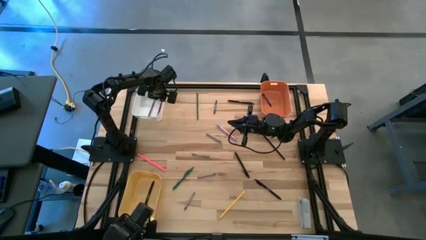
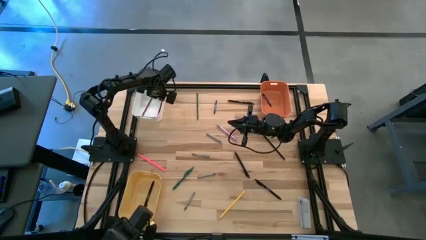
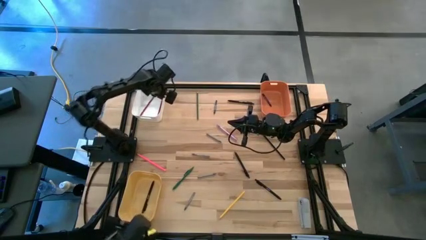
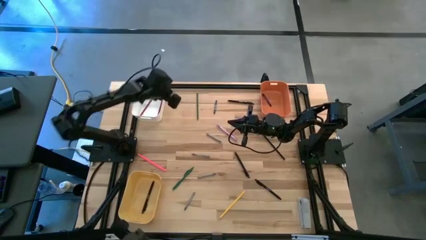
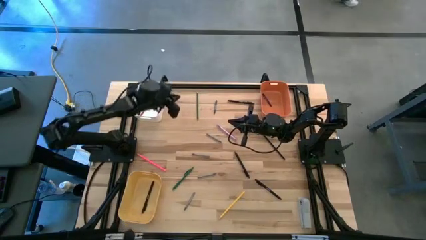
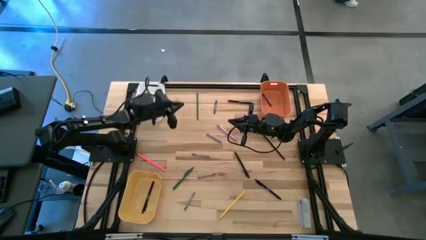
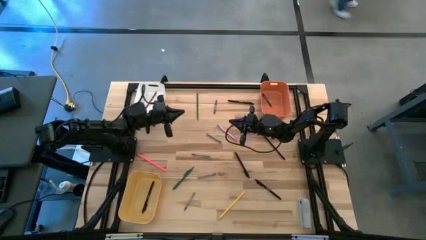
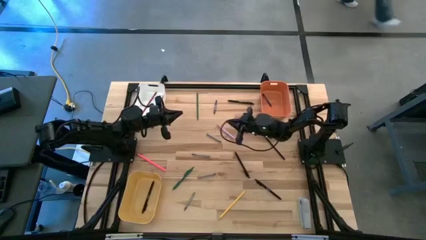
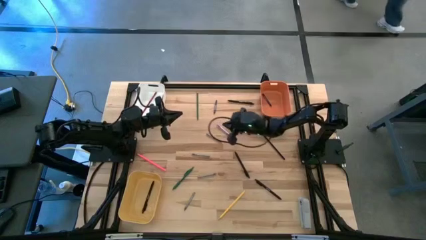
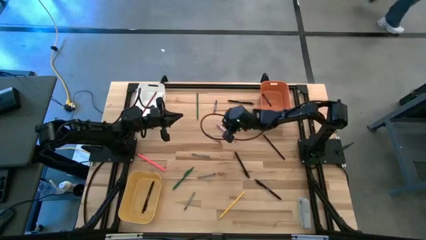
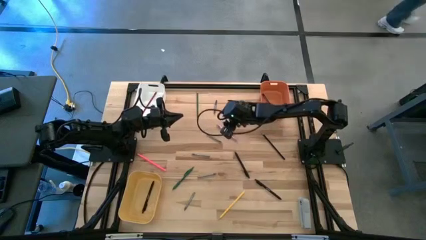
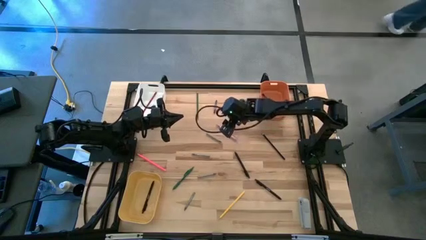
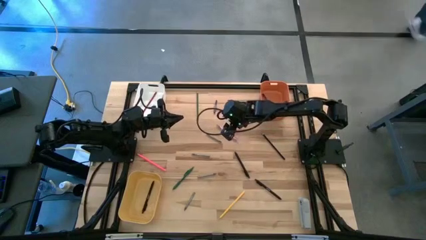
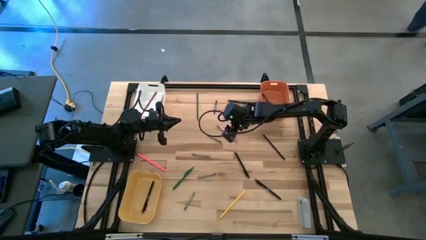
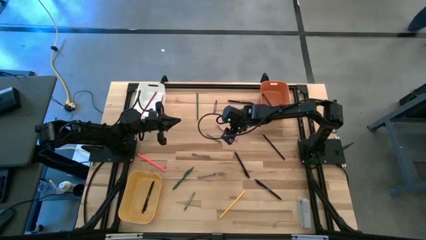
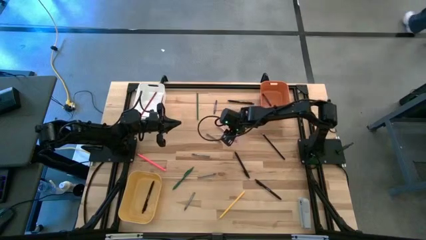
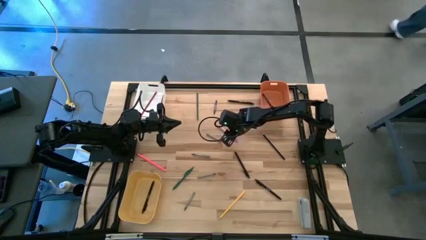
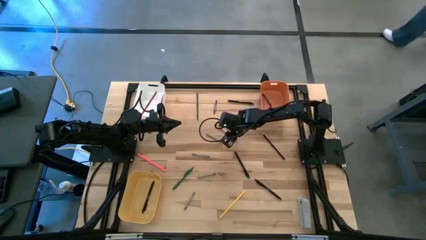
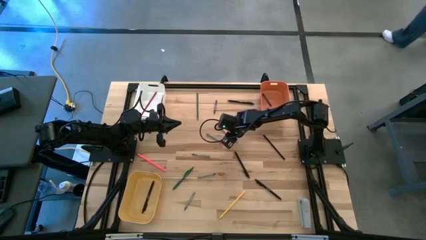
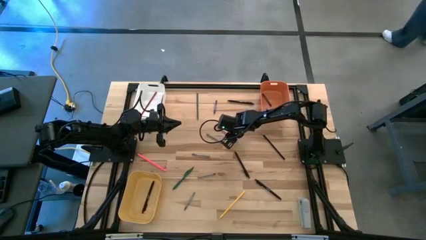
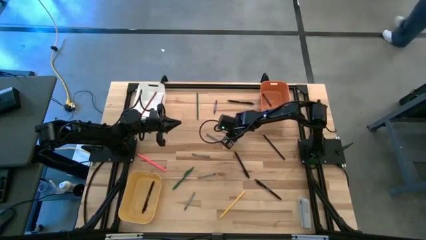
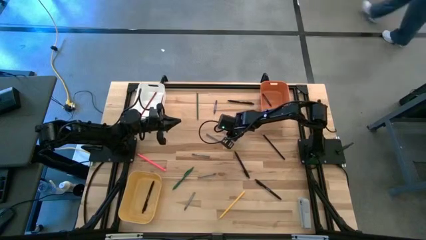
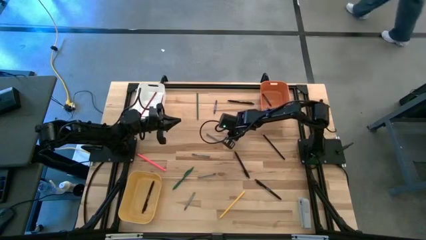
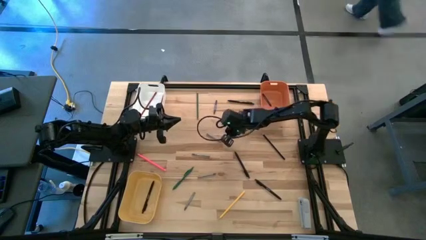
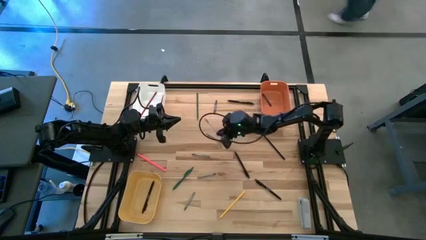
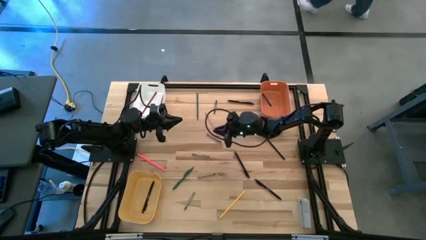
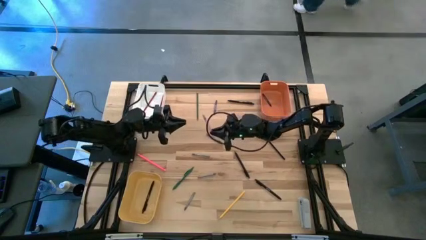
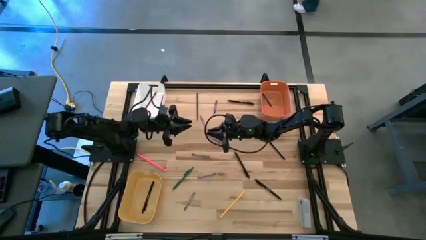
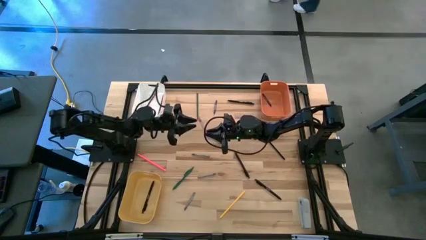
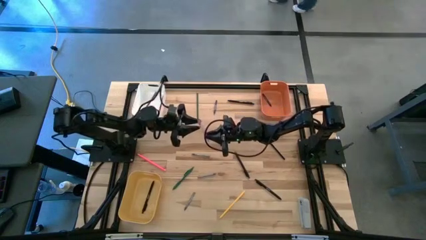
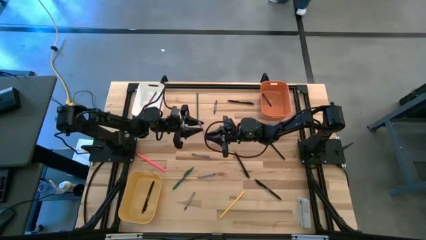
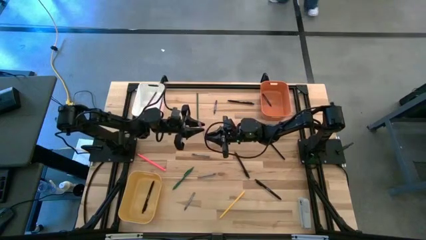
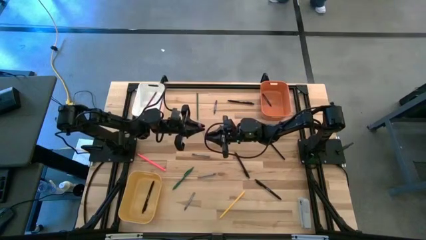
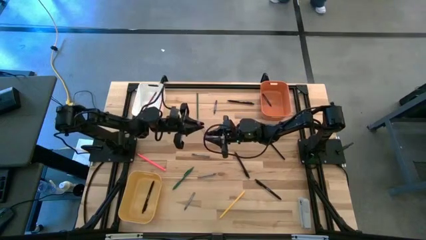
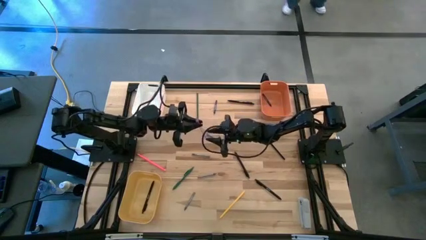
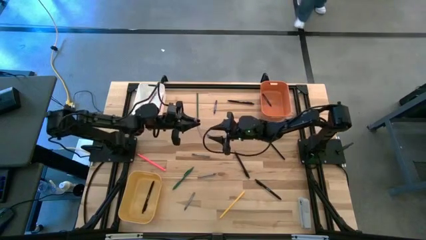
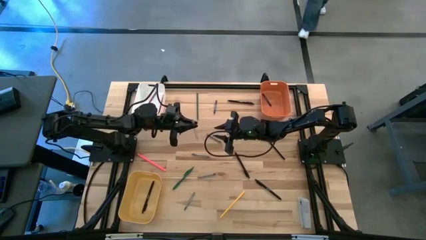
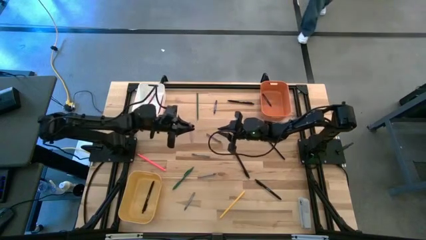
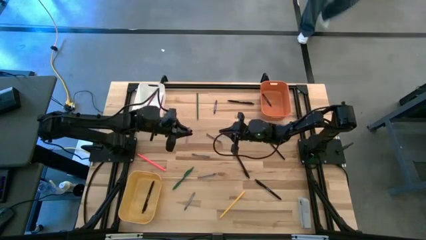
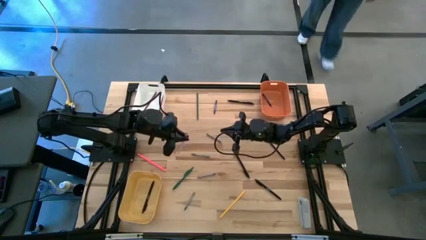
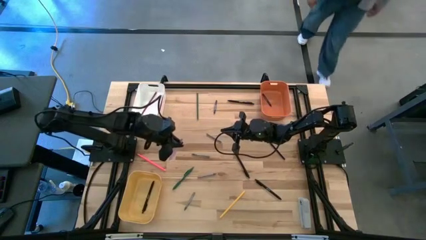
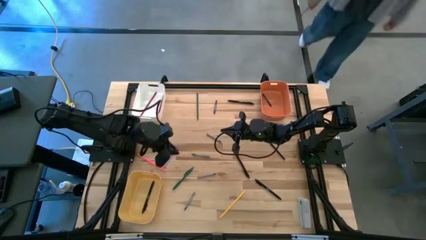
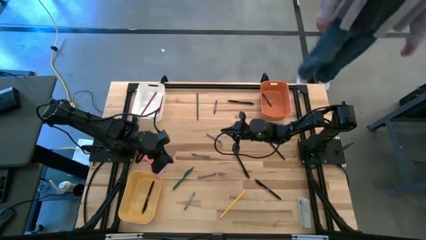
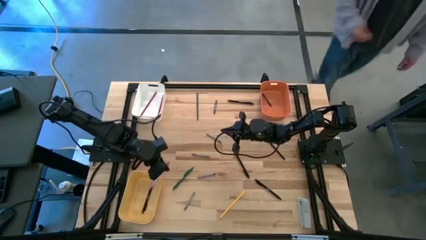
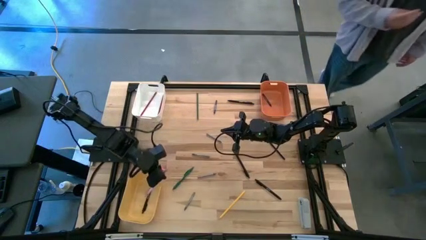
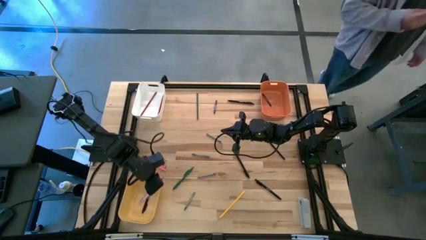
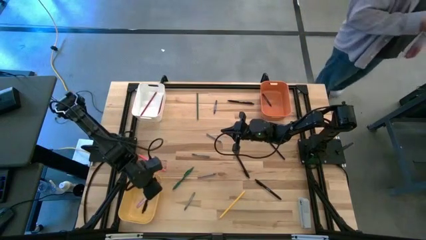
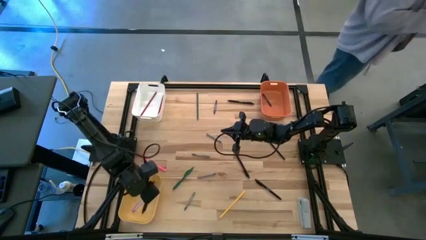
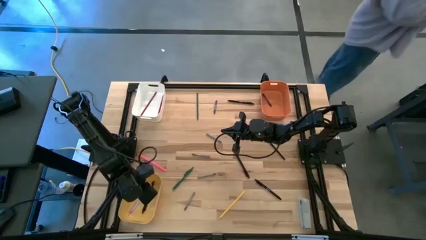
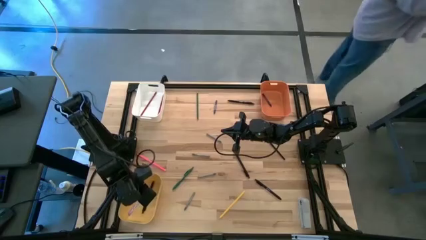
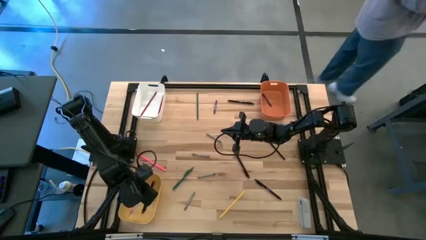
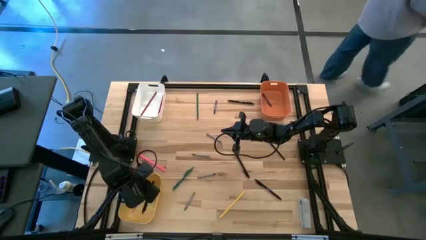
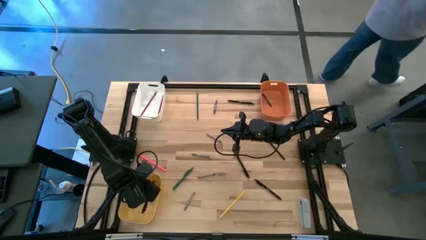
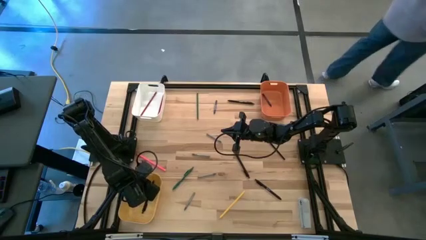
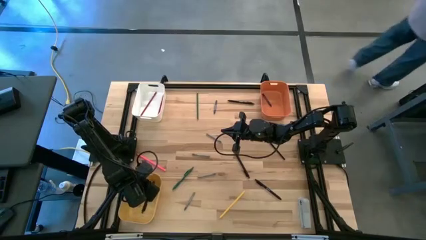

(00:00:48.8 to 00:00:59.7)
Task: Sort crayons/erasers/pens/pencils in bins
Put the purple pen into the yellow bin

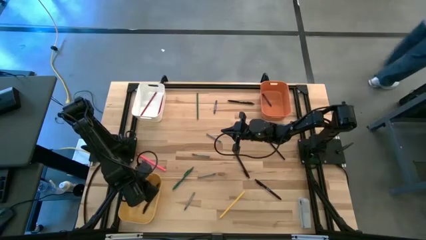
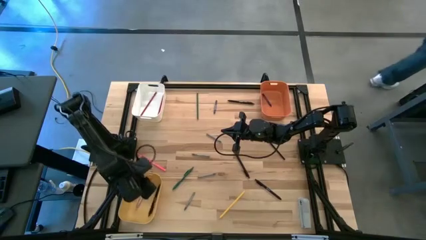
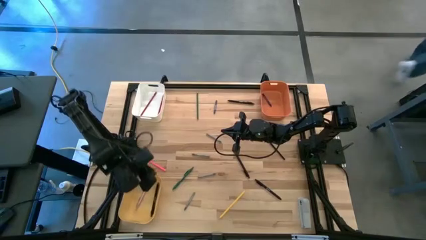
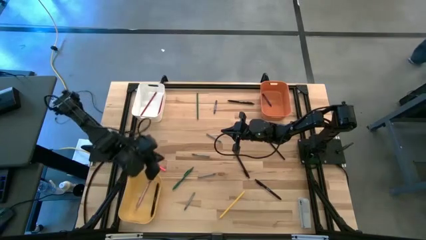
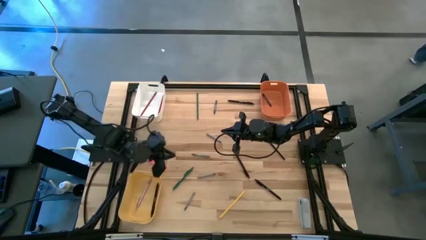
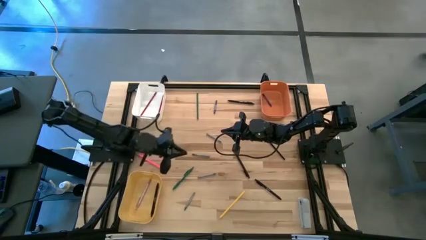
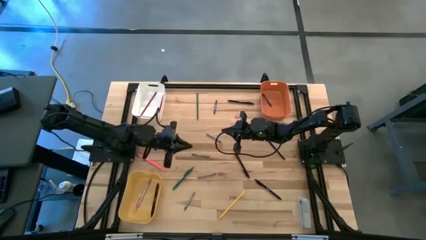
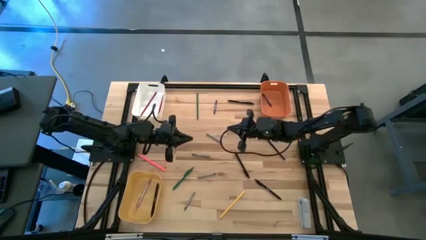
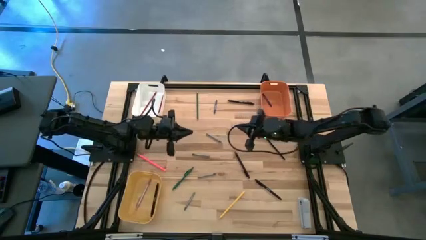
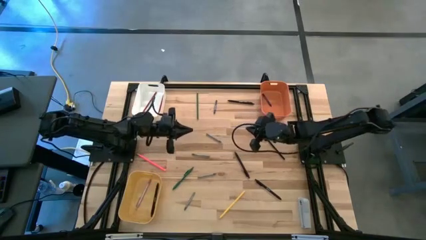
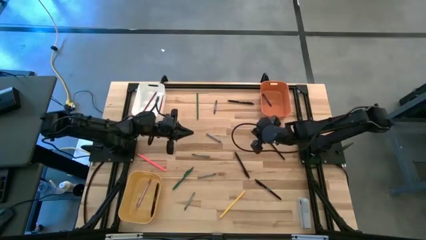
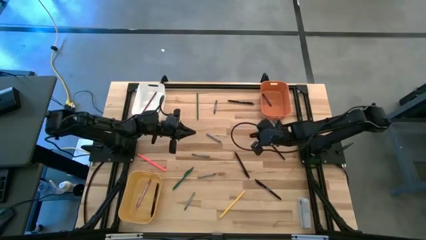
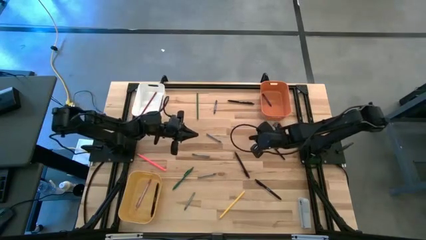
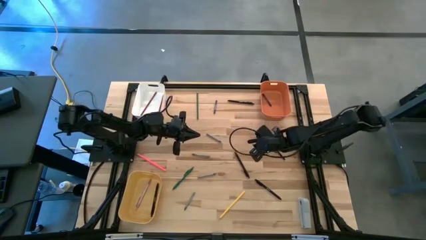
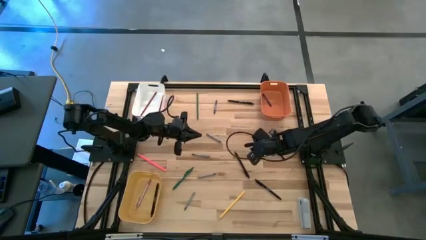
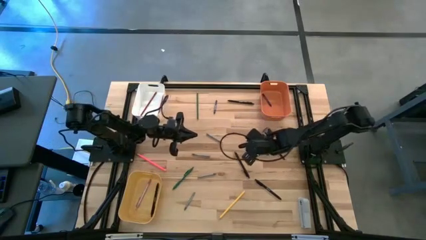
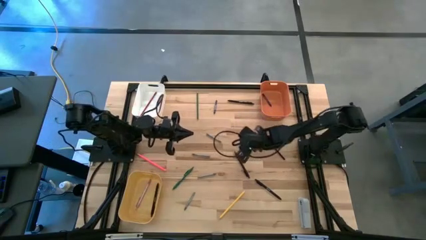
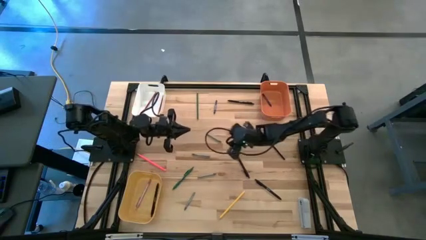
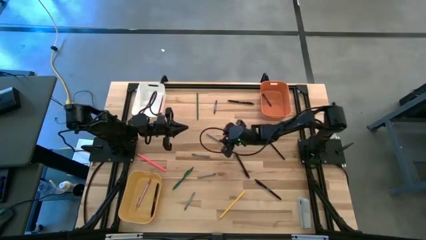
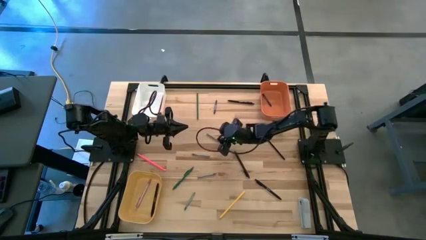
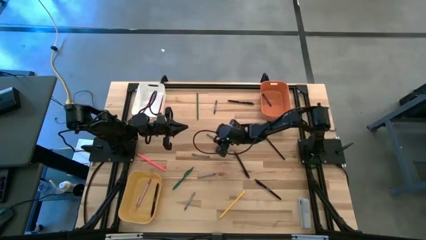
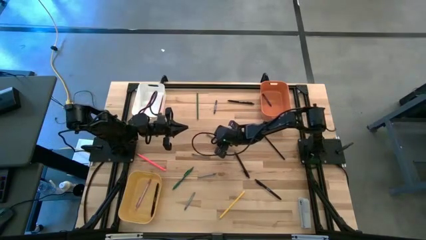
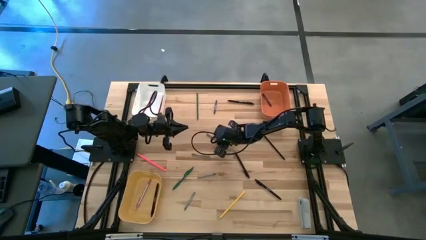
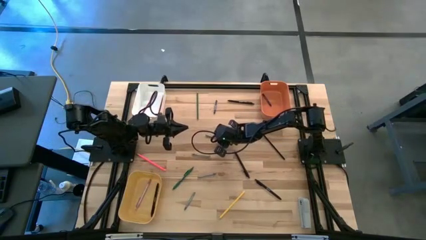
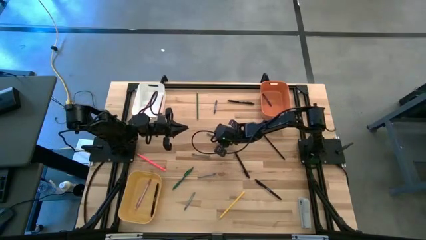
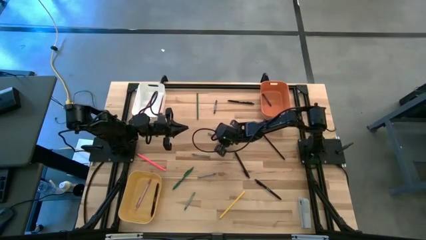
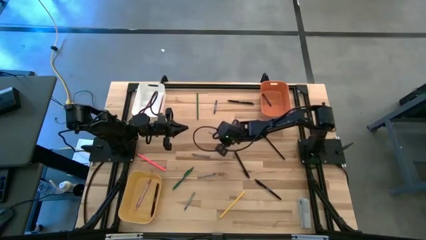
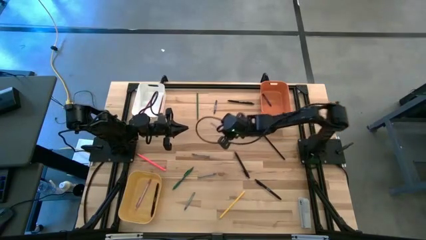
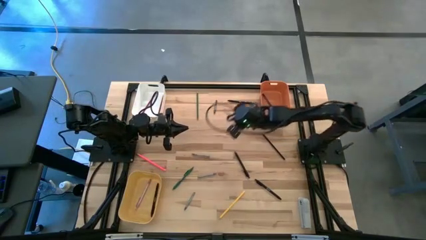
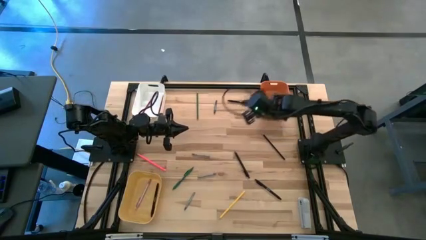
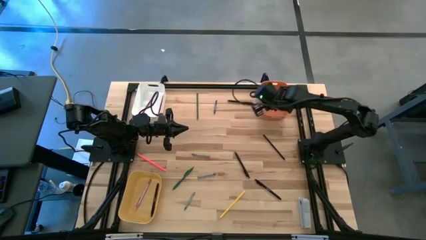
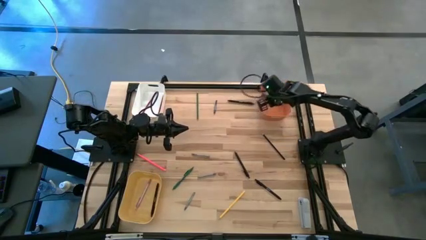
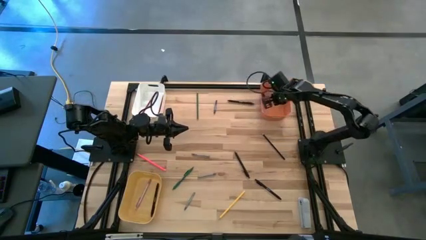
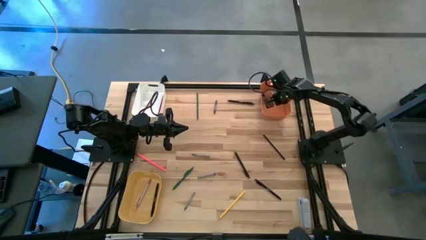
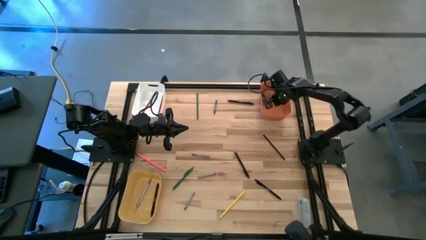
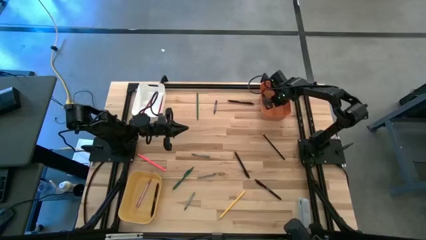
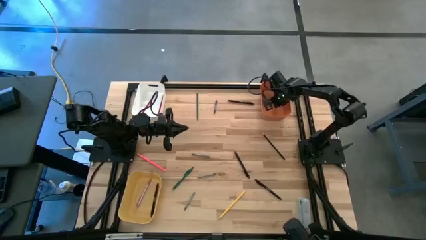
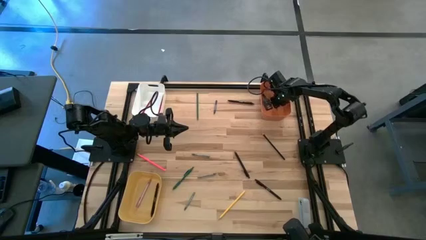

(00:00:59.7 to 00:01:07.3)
Put the top gray crayon into the orange bin
